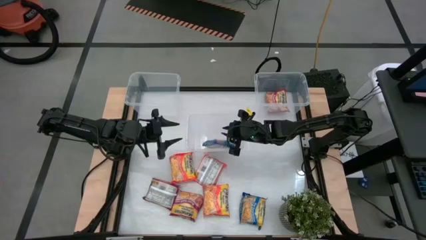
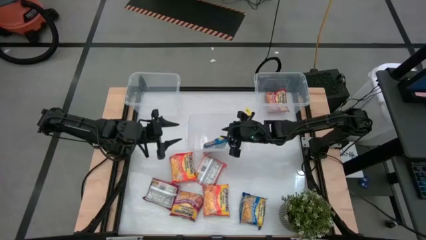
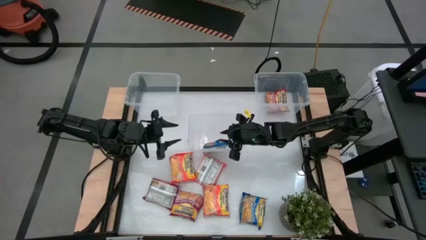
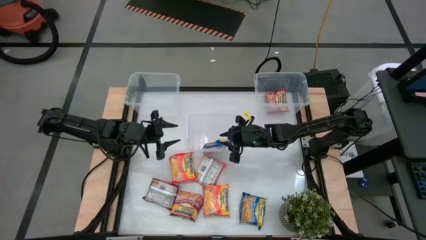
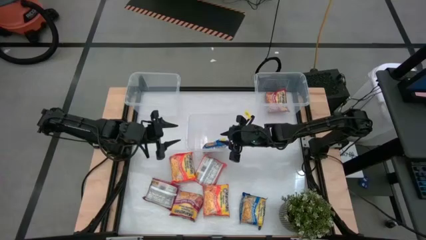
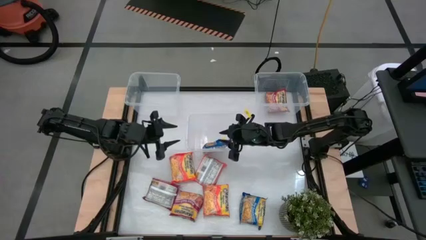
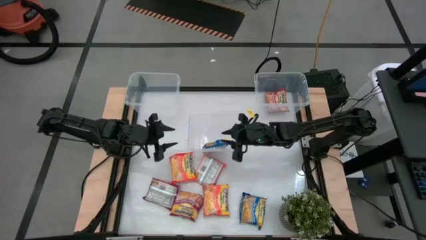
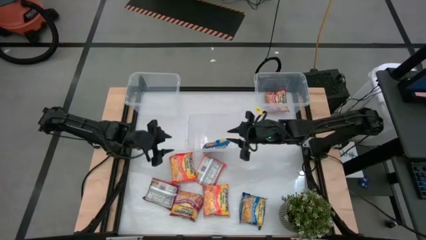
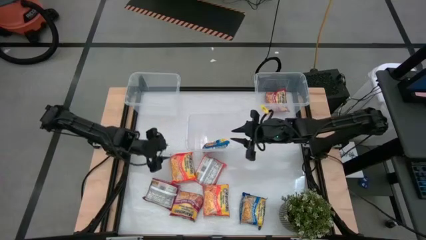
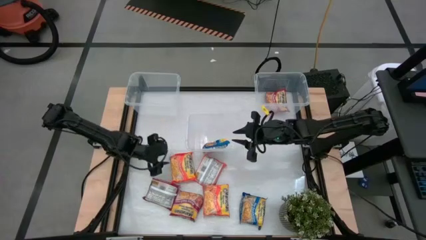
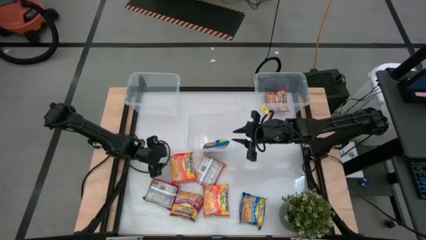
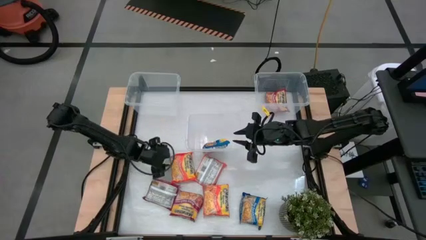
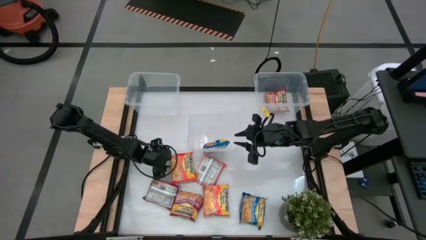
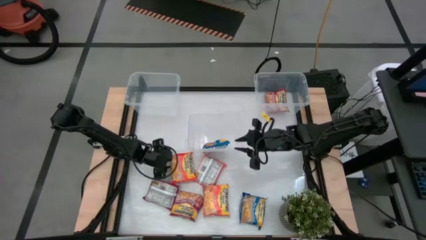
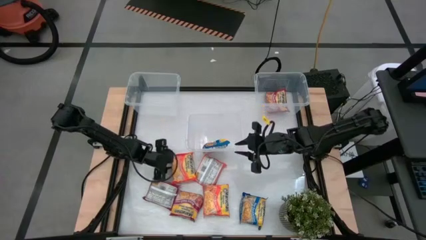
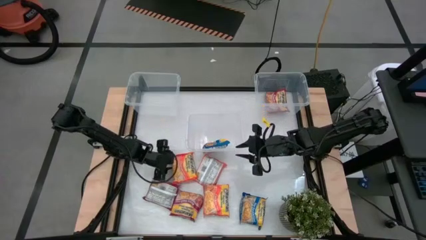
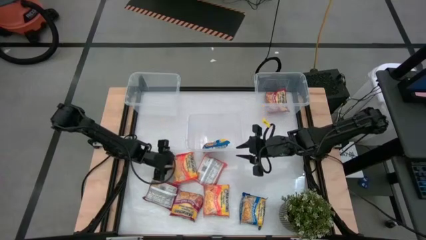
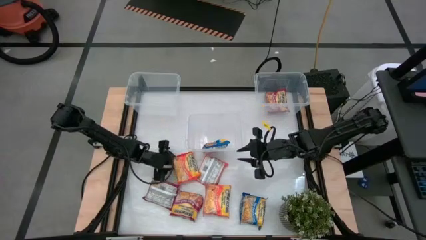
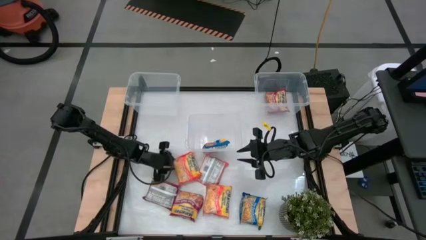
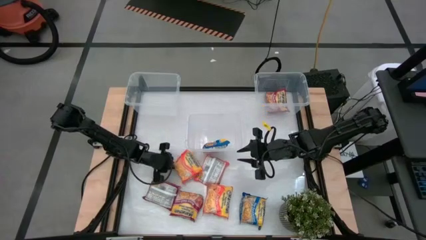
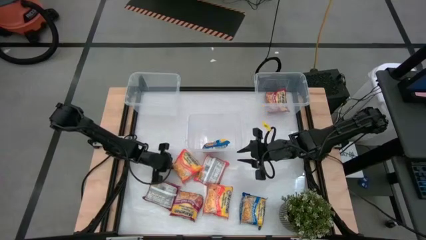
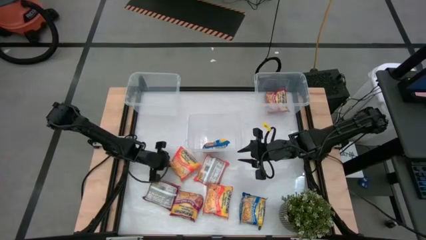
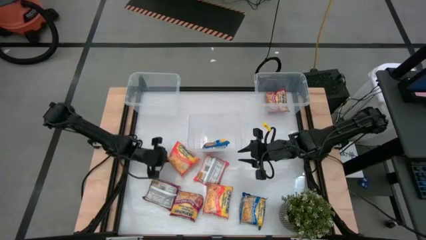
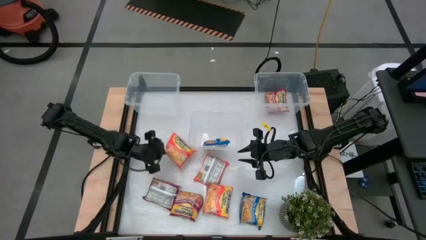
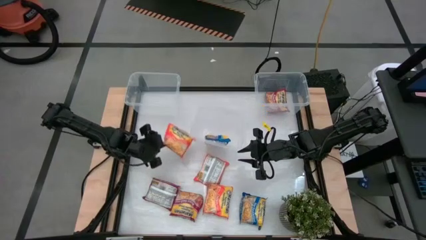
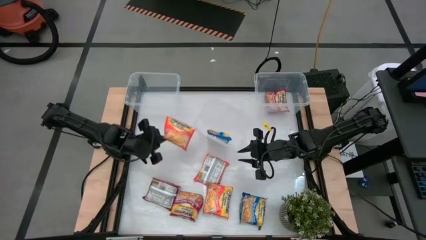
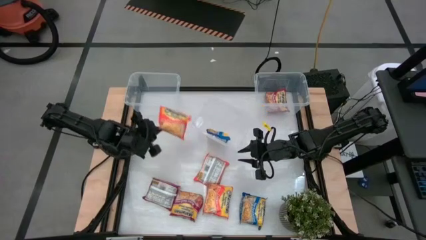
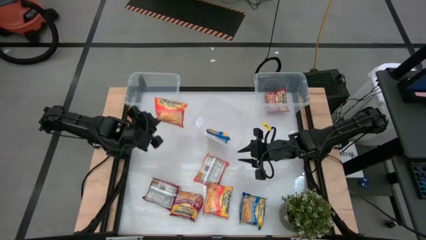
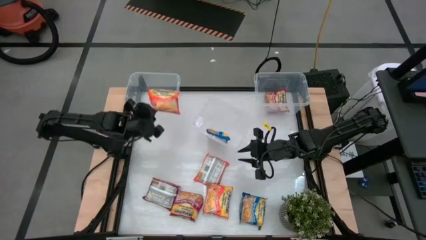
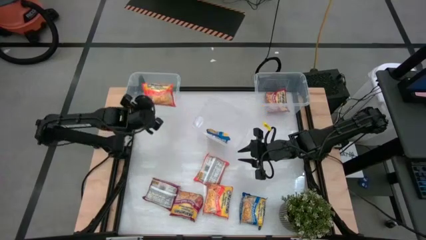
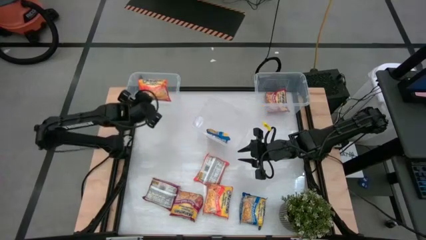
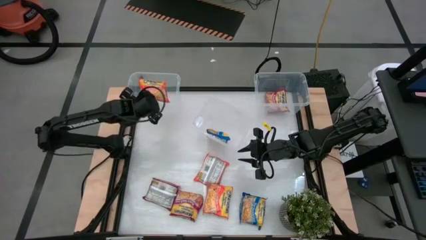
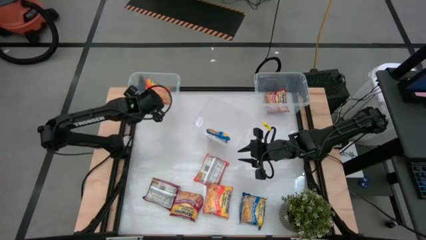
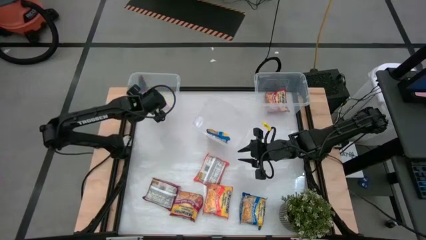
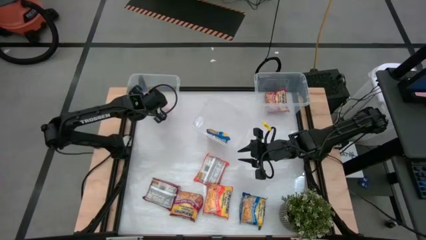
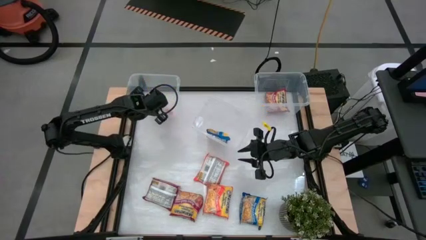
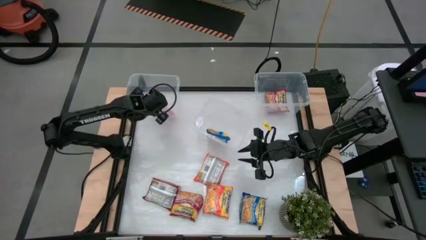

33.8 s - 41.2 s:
Task: Sort Maruchan noodles
Put the top left orange noodle pack into the top left transparent bin

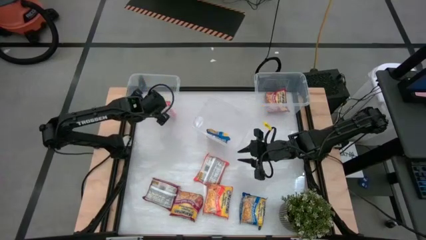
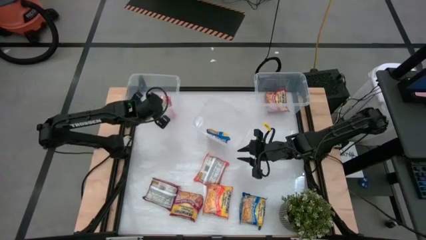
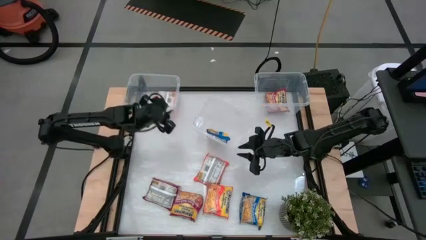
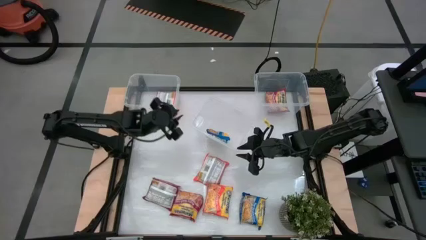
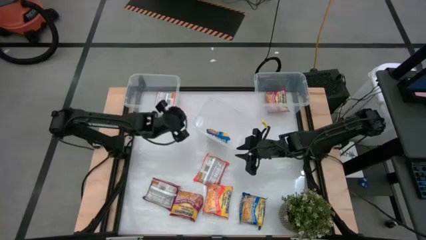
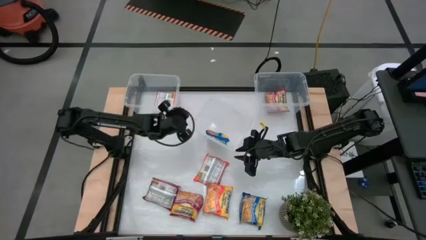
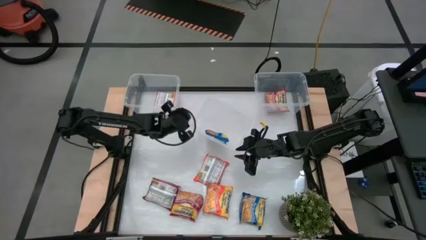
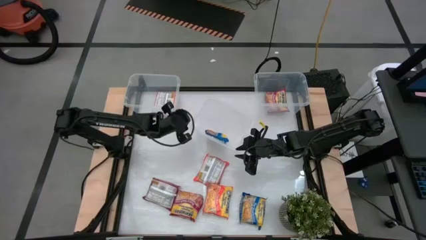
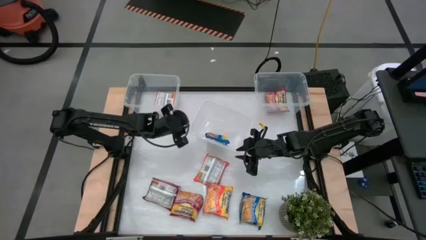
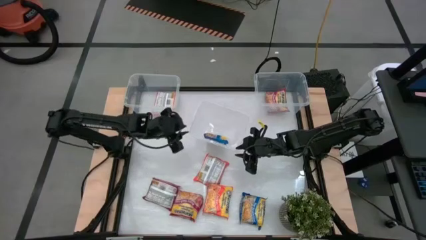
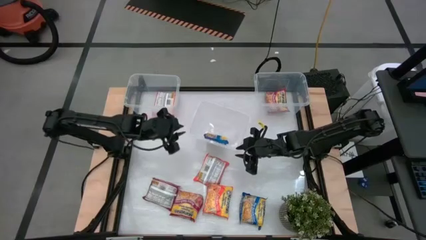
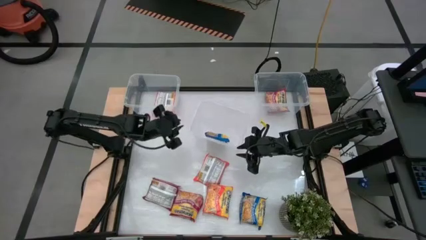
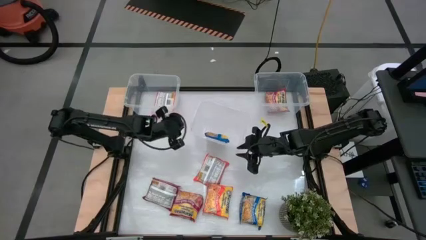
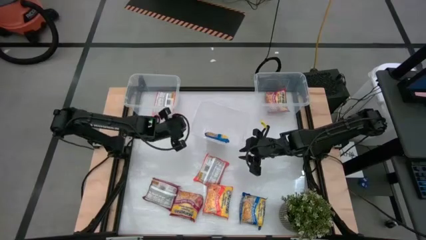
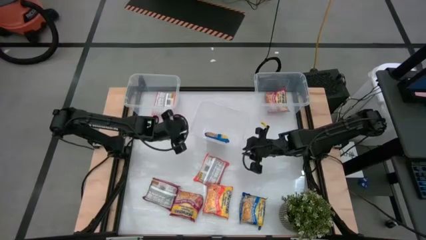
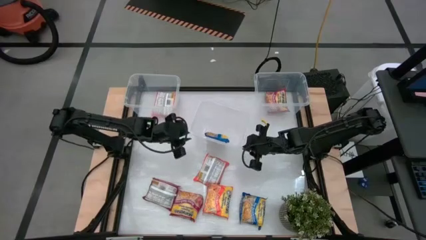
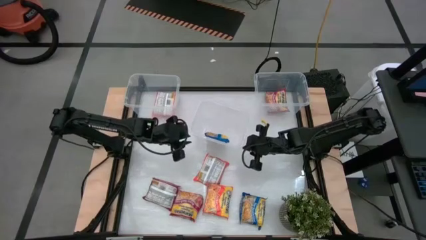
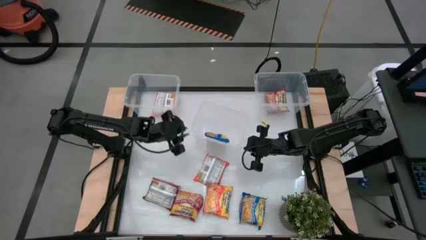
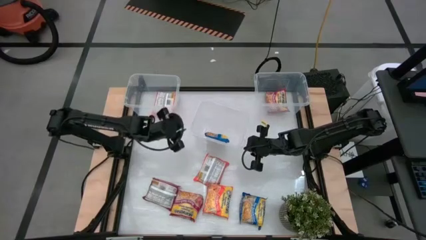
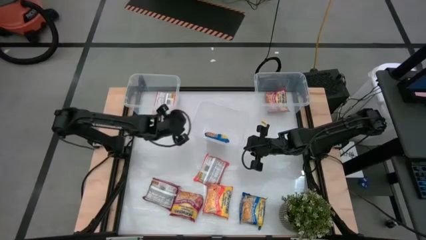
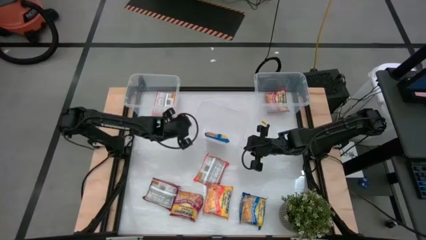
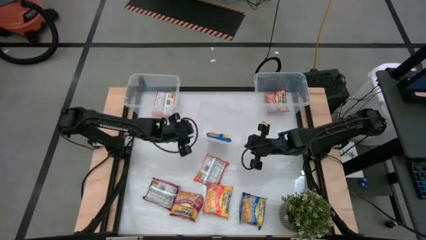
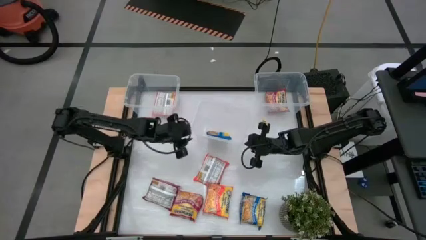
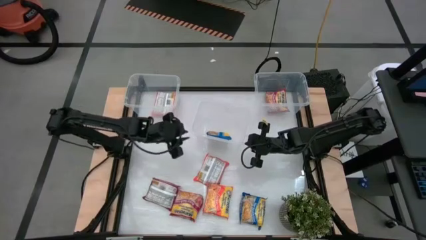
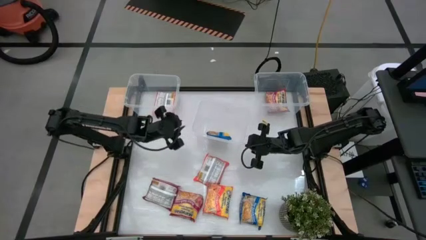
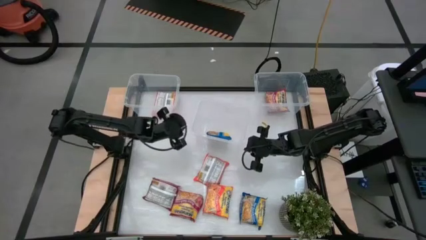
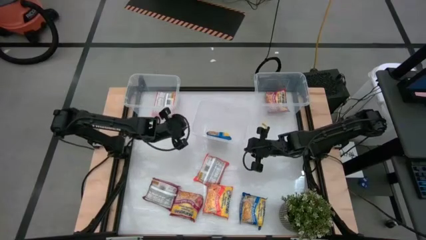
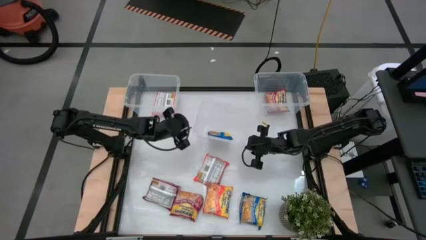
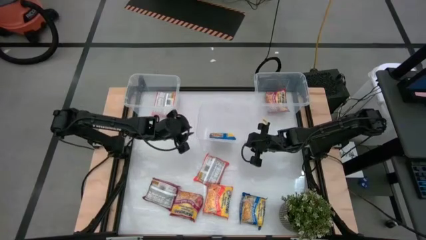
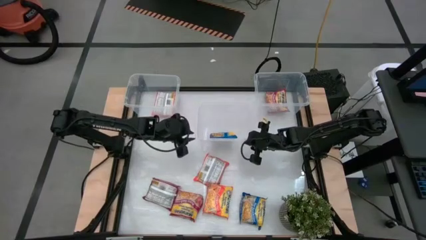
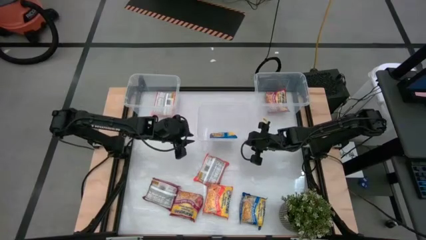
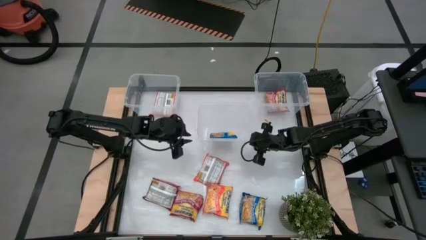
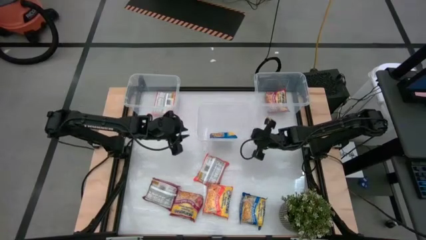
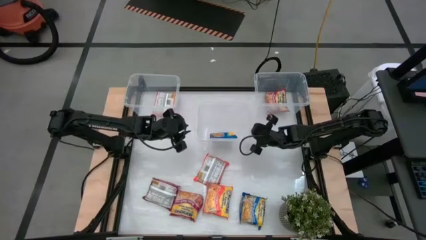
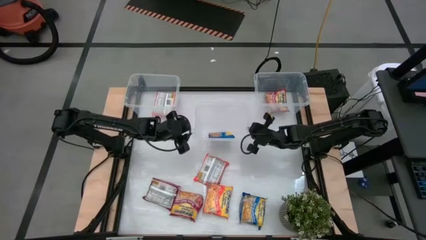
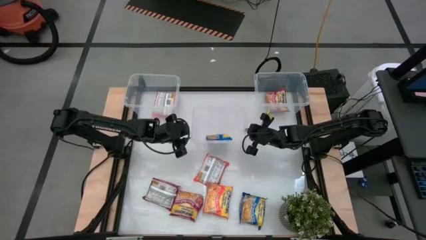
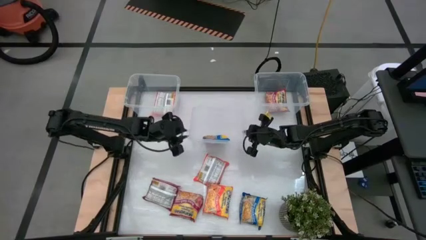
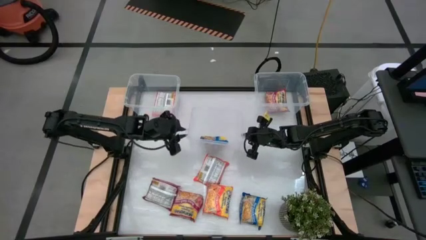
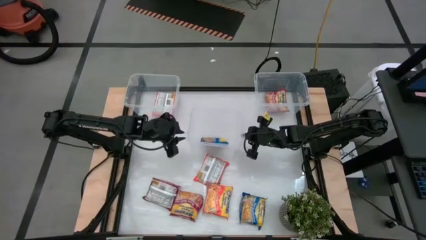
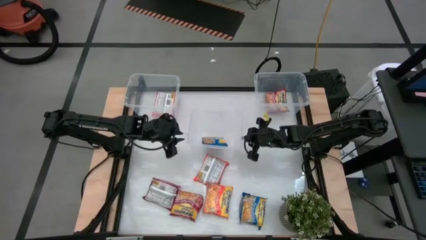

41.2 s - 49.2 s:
Adjust the bottom transparent bin
